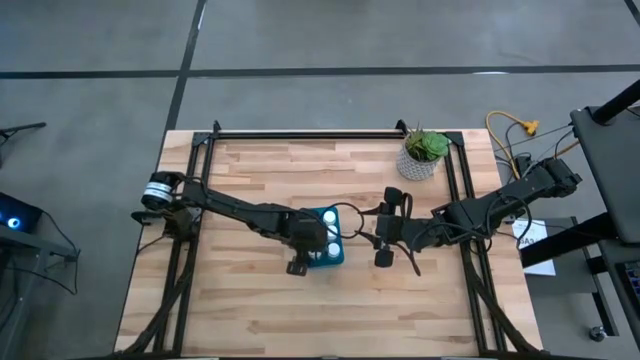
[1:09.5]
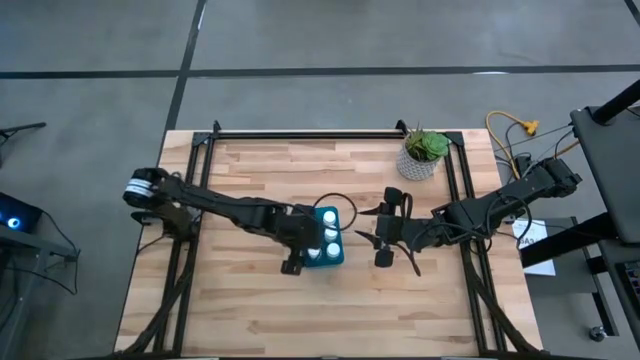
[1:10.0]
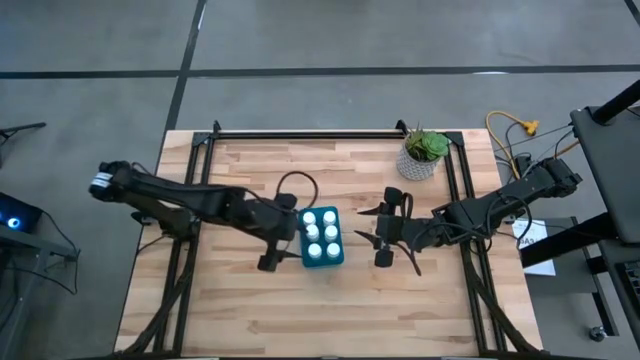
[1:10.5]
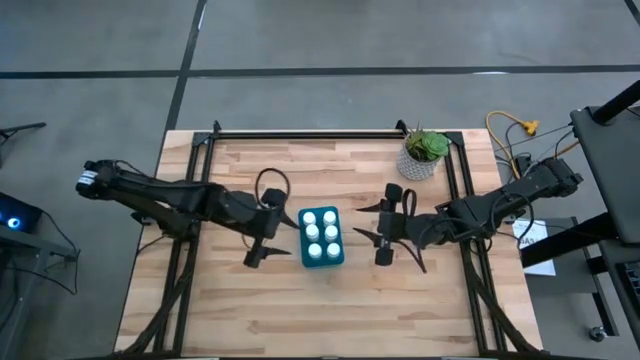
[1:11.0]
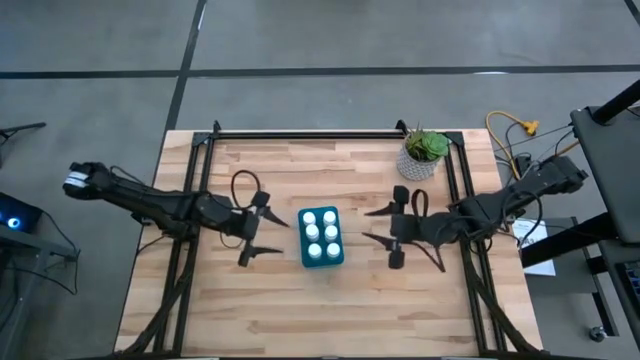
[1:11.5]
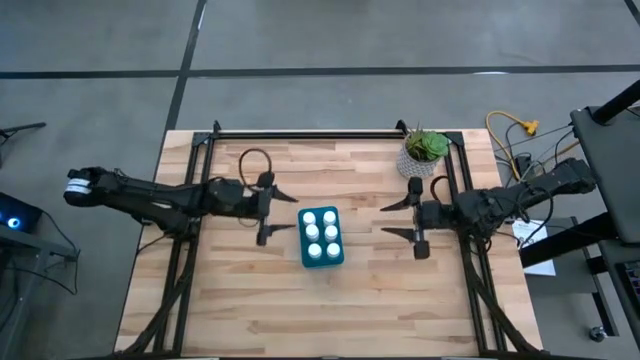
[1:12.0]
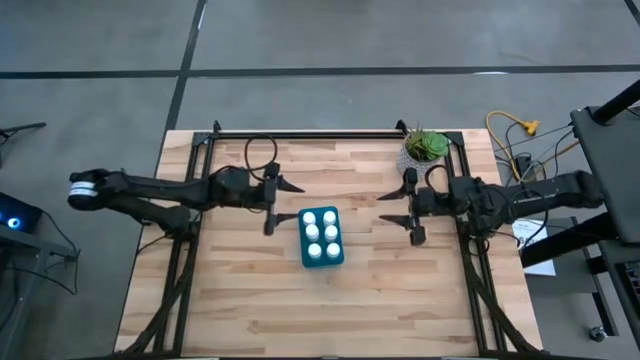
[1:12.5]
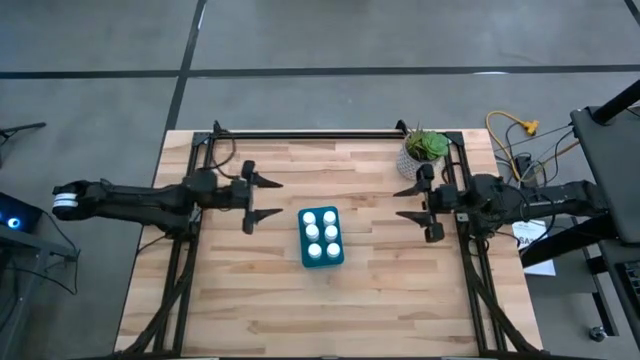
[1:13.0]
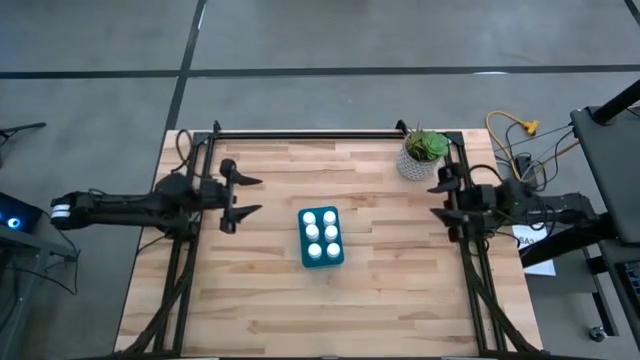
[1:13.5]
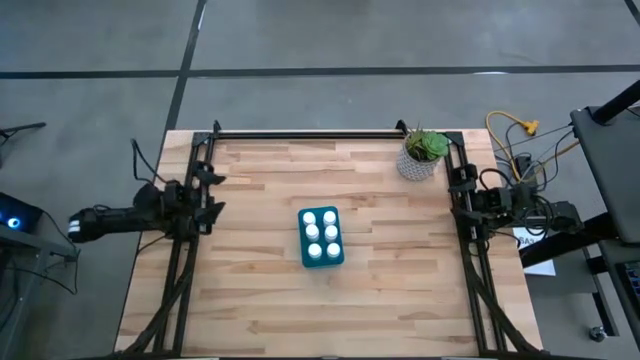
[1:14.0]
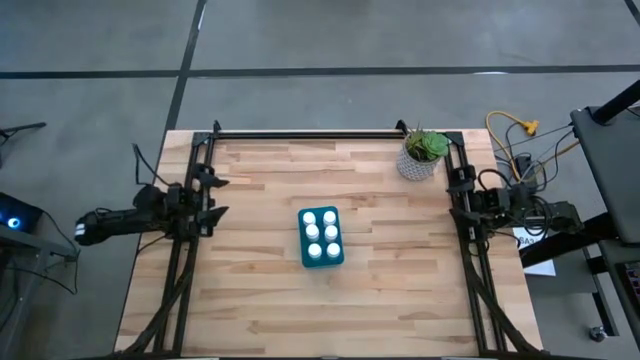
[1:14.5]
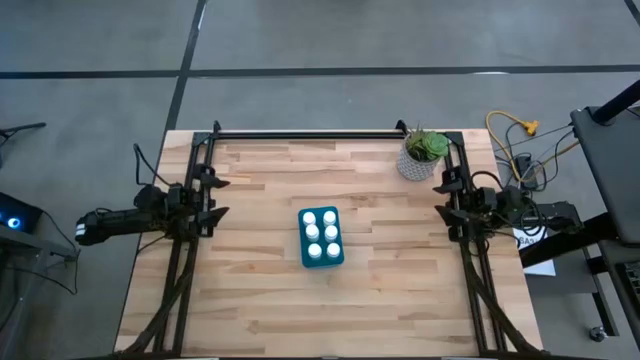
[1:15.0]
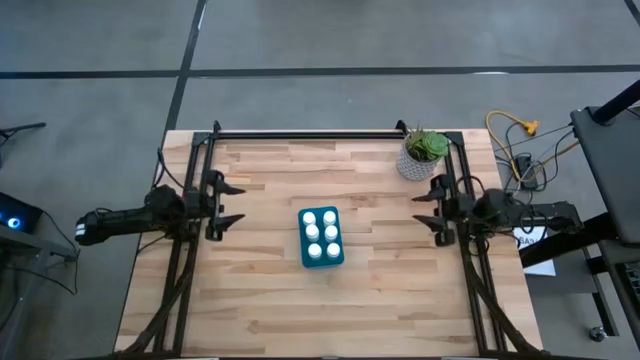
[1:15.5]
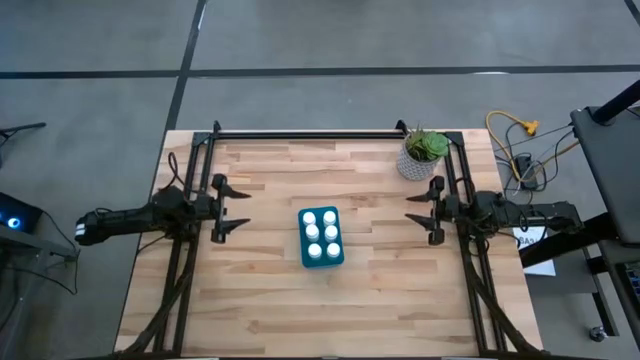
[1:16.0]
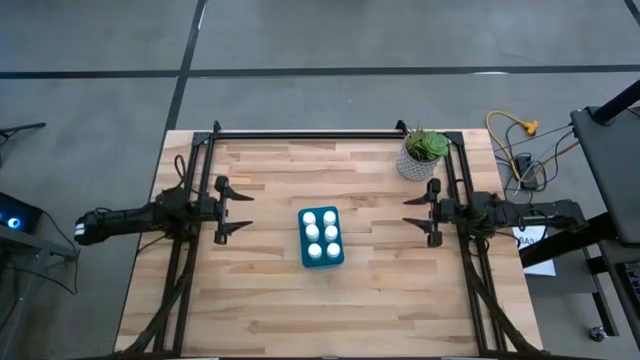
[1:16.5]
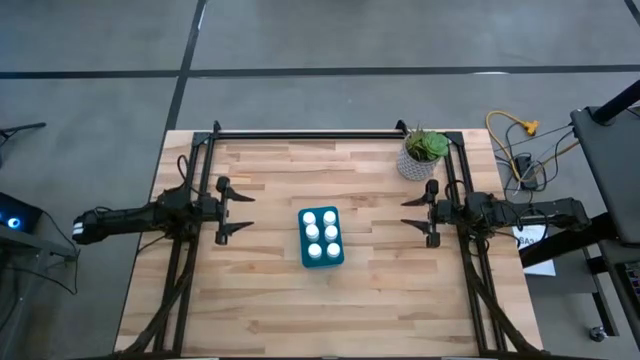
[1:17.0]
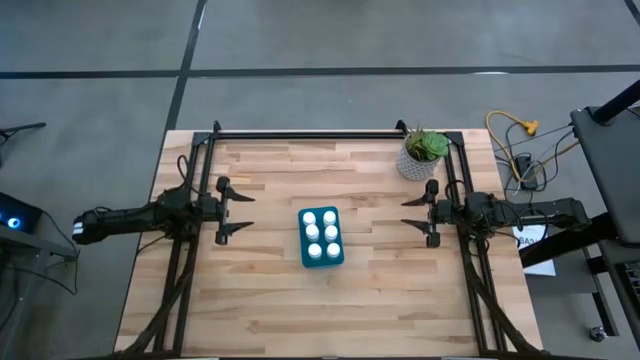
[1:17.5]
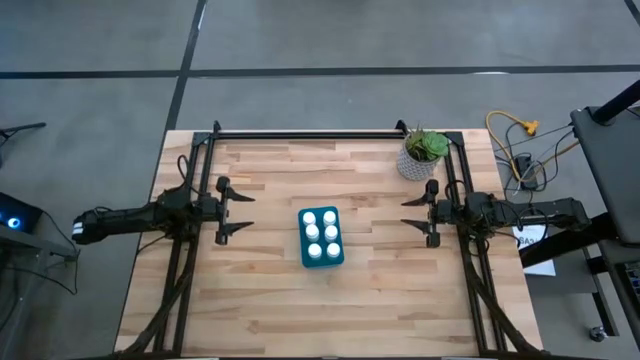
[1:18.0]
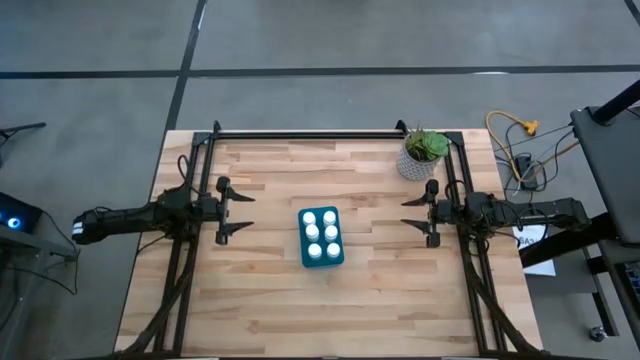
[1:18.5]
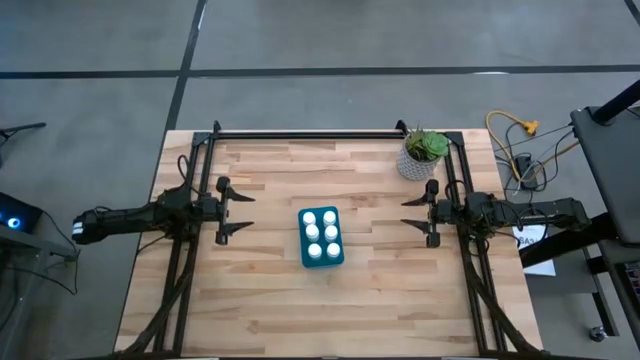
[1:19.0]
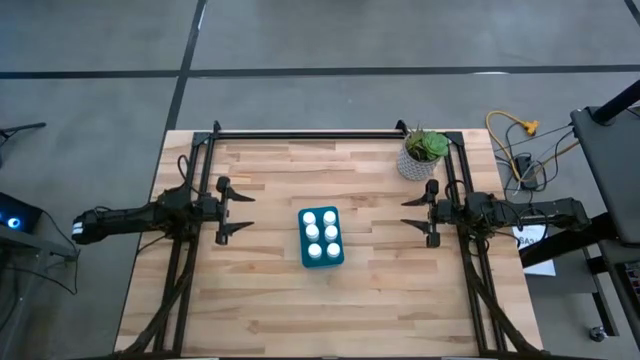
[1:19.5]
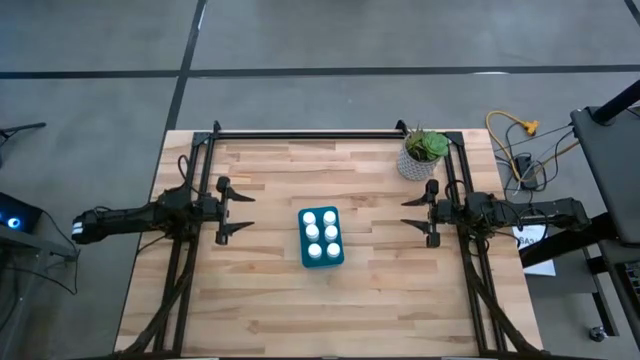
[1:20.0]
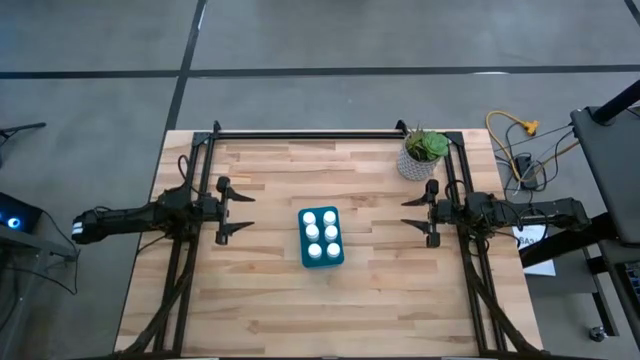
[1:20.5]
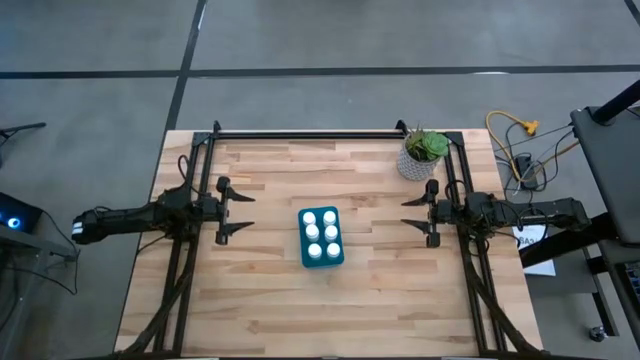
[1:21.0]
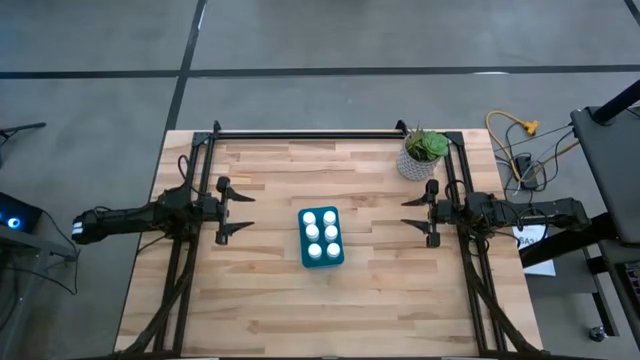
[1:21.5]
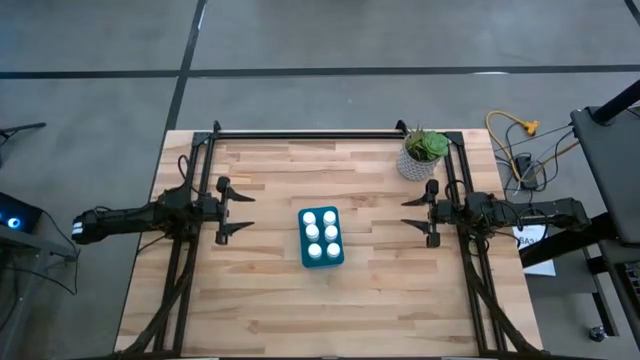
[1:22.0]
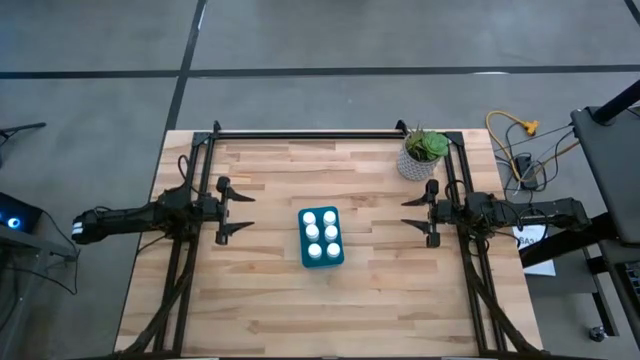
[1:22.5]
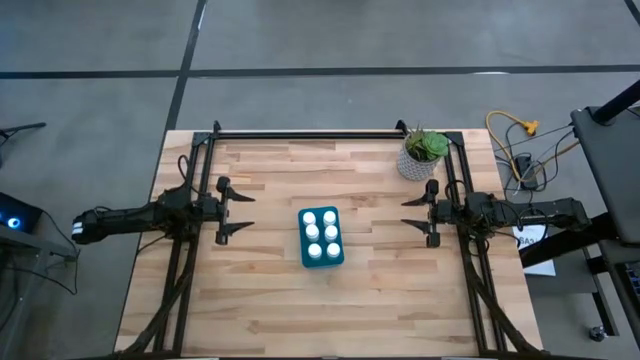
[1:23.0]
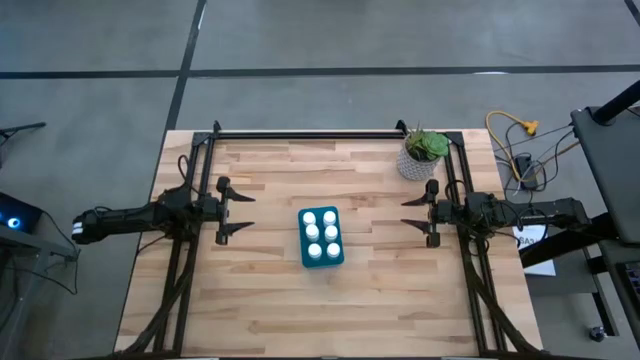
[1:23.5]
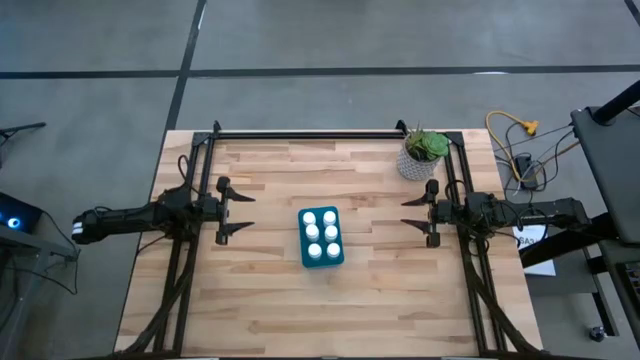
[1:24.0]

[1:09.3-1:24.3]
Task: Pick and place pill bottles into a basket
Return to Home Position
